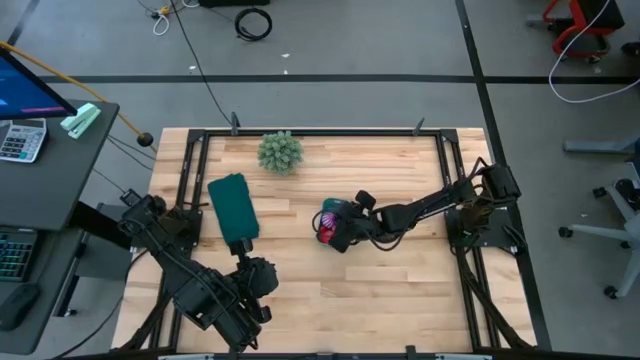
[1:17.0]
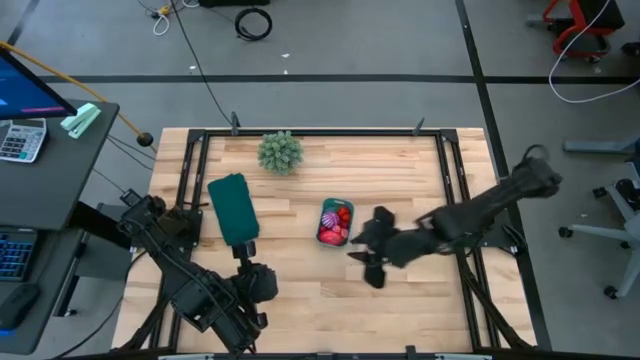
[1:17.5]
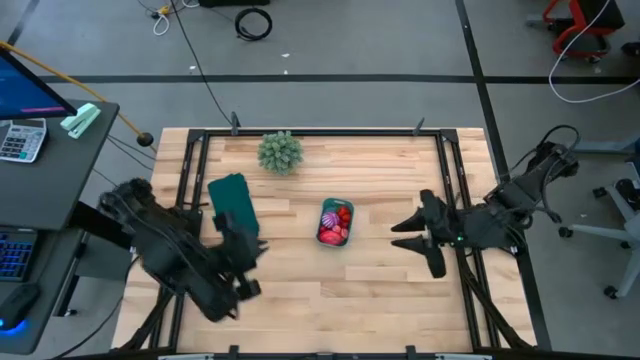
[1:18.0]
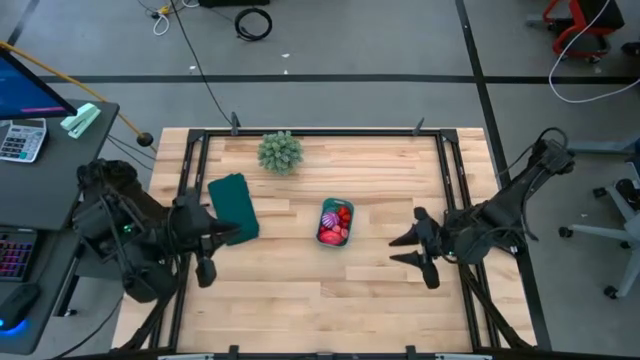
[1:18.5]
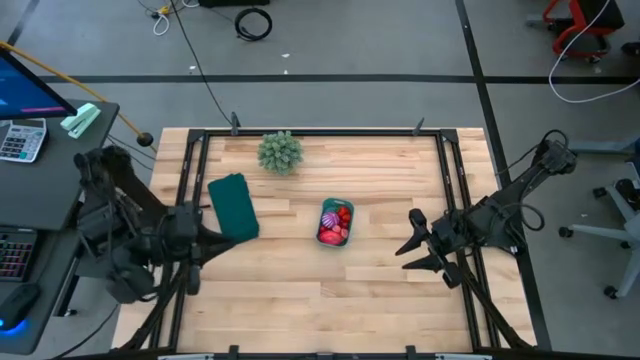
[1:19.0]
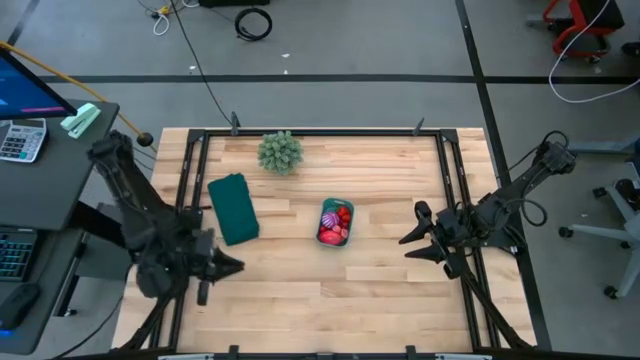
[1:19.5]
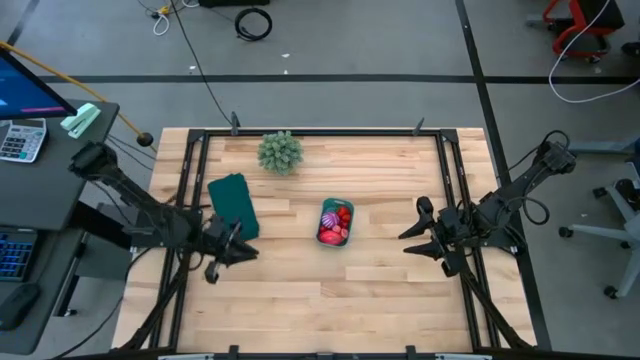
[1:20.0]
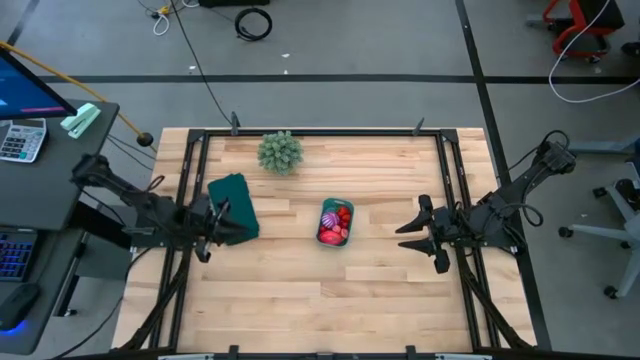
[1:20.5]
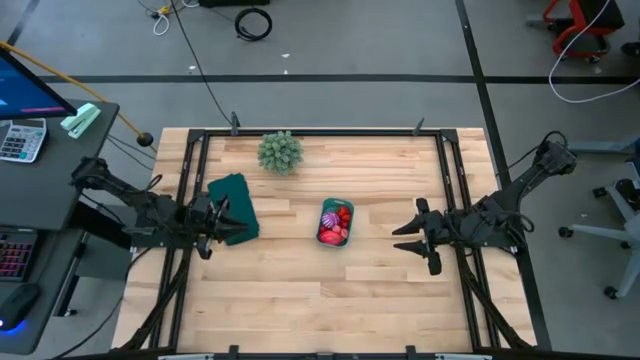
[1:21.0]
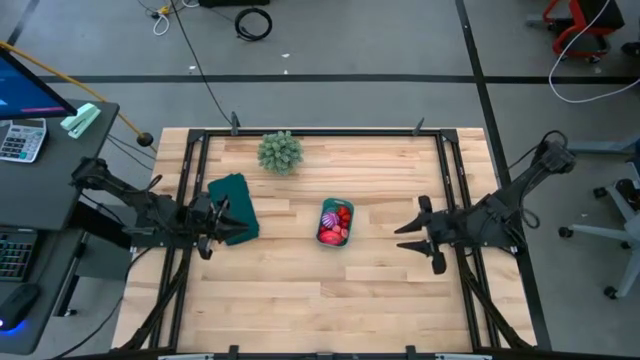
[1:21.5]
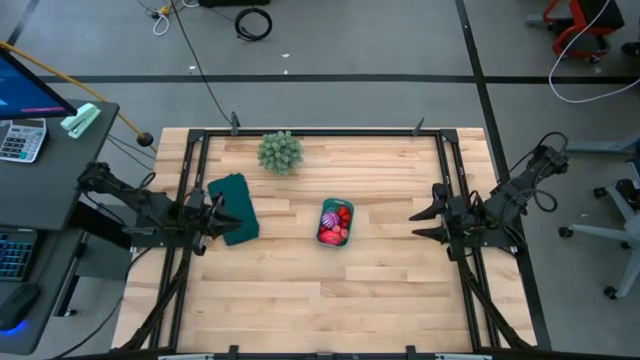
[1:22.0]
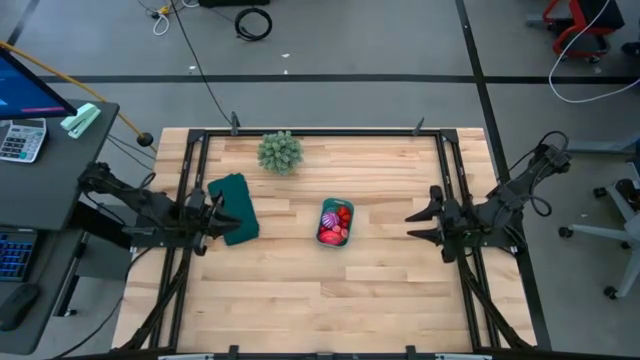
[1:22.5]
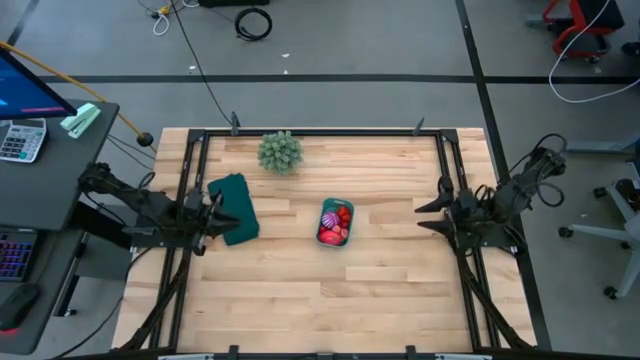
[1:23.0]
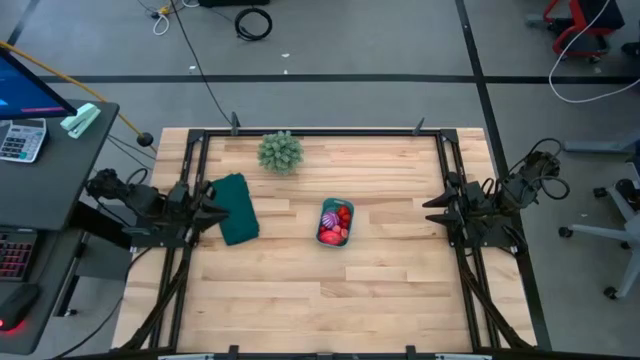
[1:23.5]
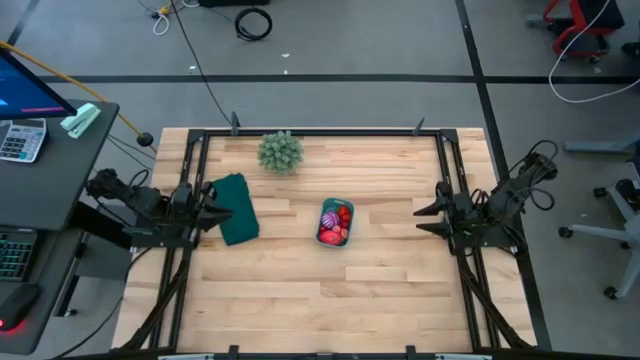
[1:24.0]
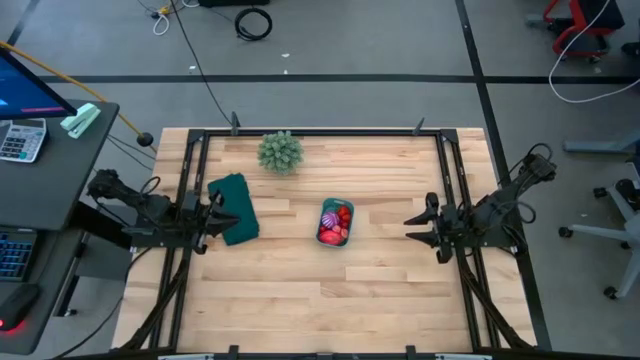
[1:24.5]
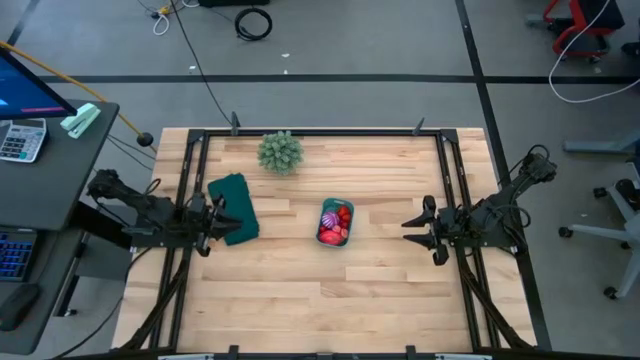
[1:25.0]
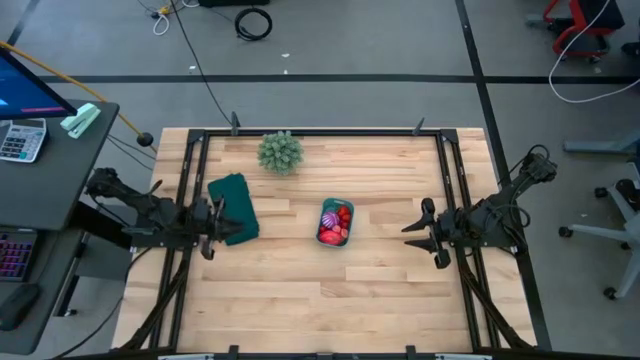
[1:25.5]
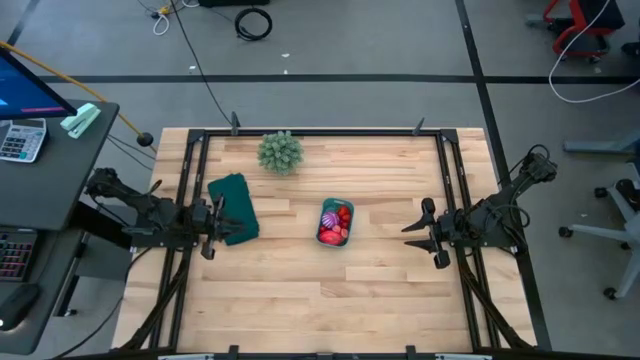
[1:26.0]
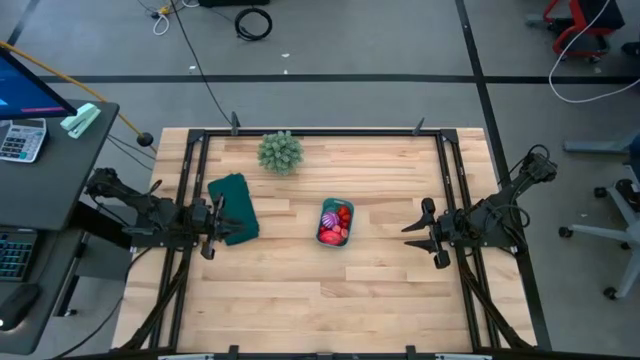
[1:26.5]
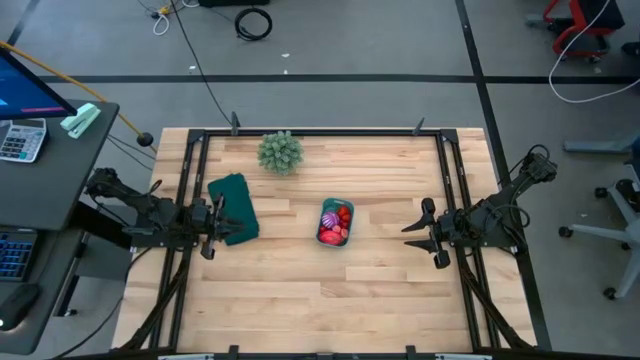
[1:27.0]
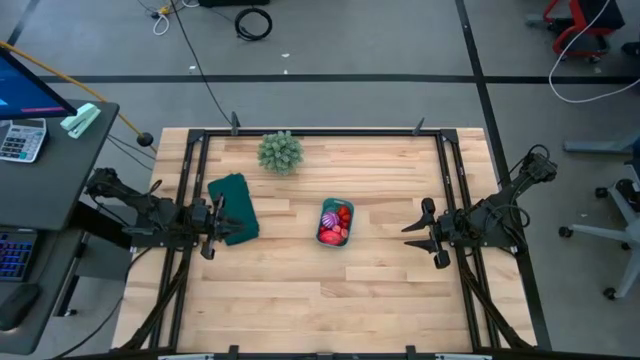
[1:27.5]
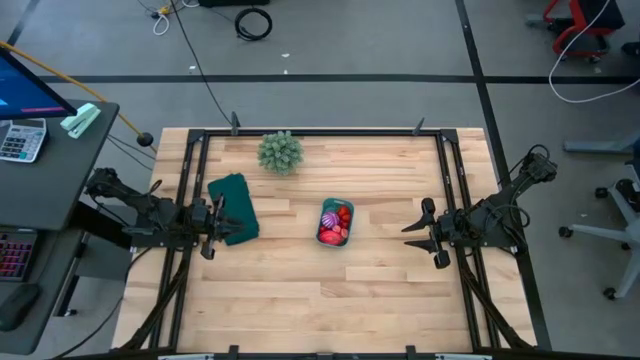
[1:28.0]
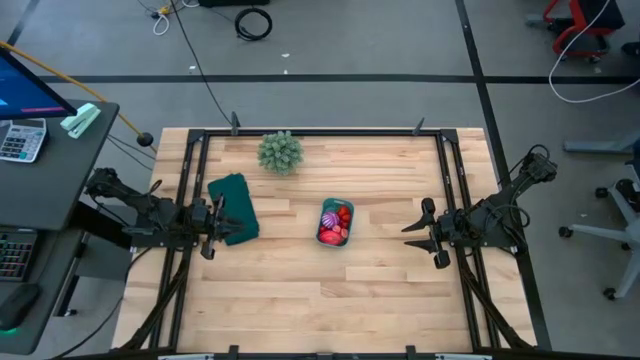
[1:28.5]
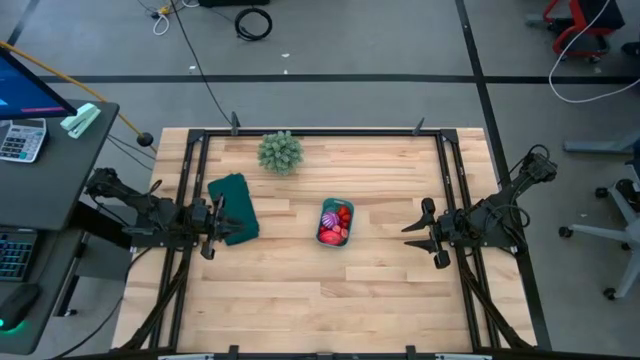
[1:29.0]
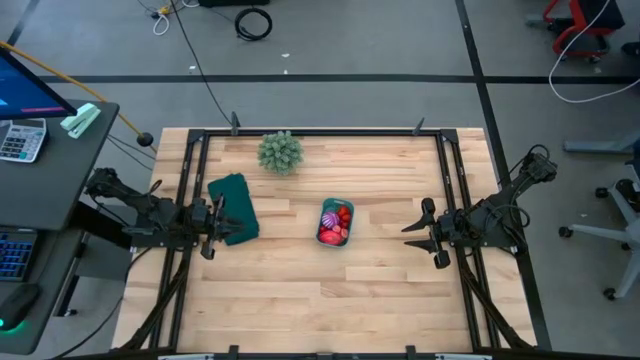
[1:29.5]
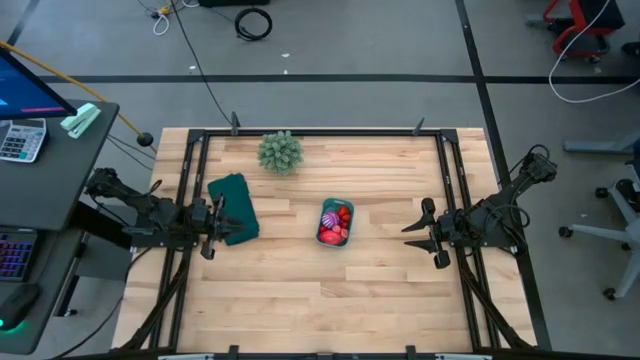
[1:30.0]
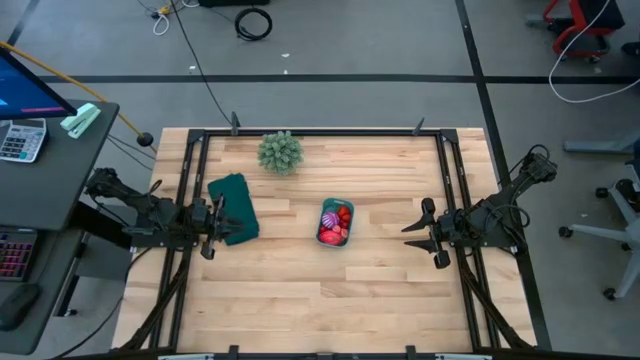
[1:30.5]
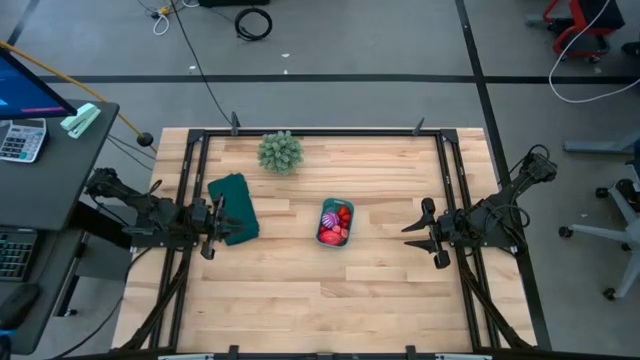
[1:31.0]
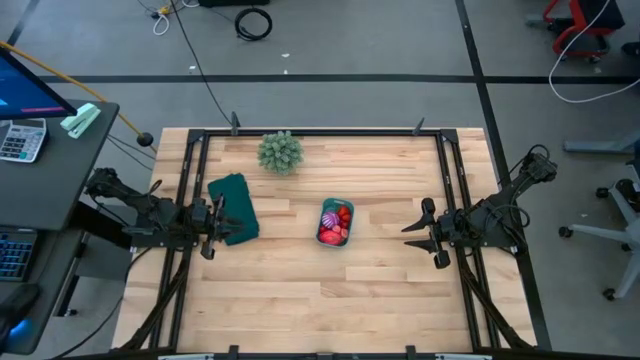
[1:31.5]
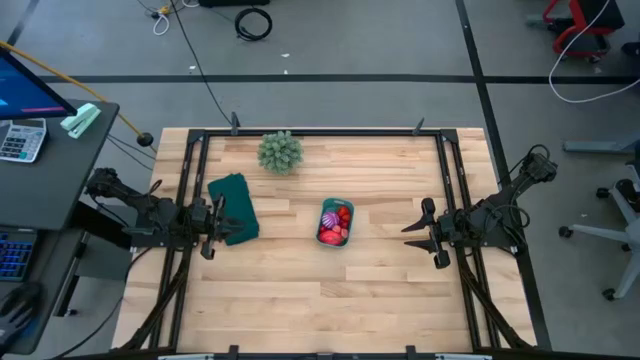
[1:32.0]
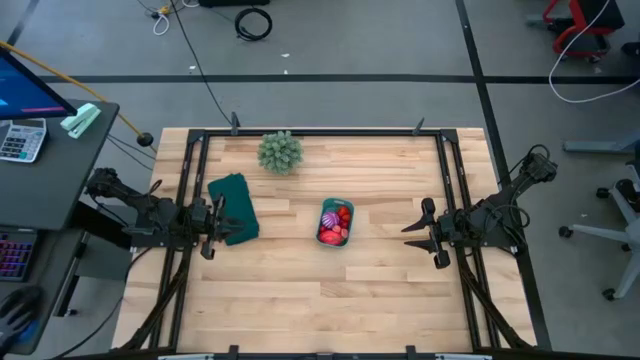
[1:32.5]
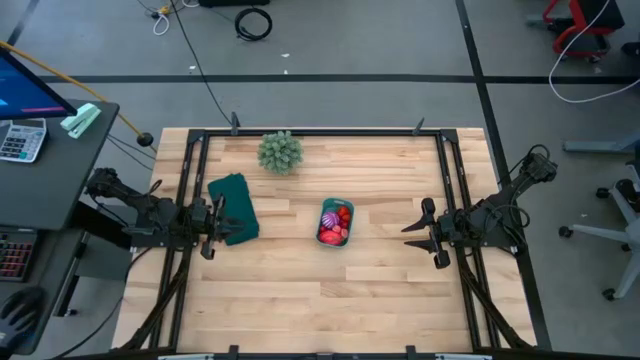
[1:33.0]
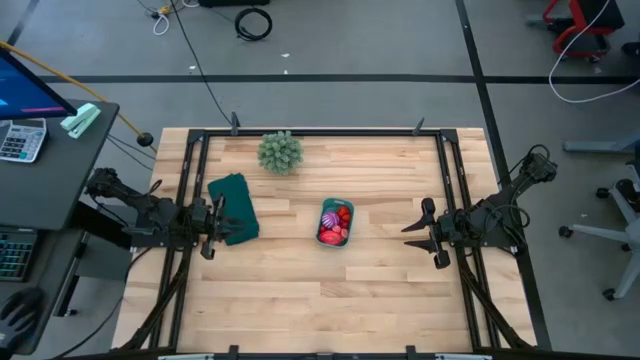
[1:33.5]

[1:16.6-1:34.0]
Task: Pick and placing Produce into tupperware
Return to Home Position

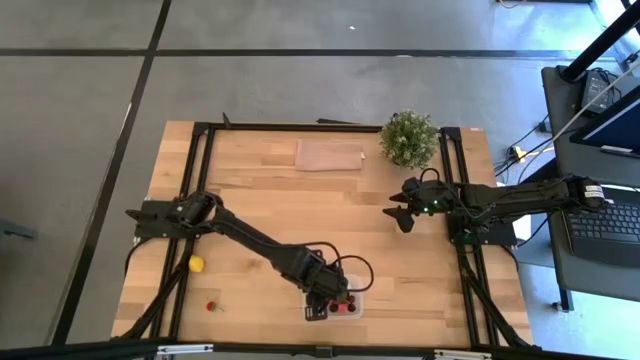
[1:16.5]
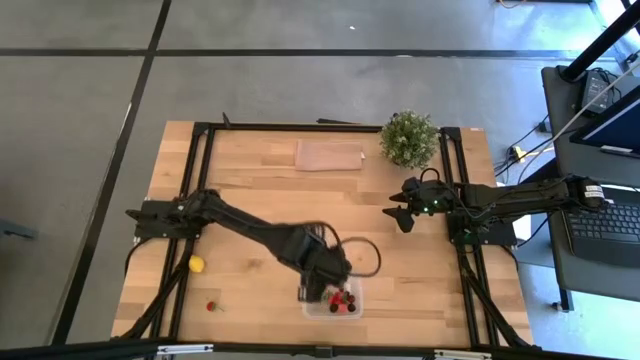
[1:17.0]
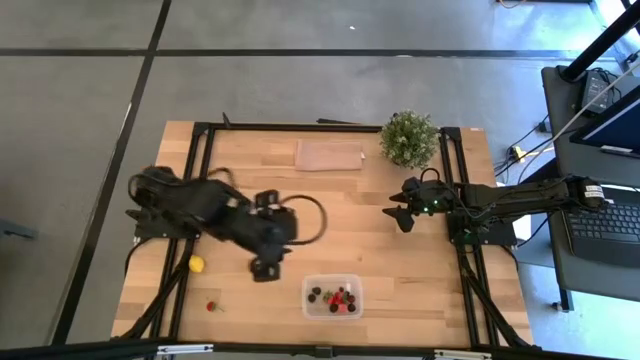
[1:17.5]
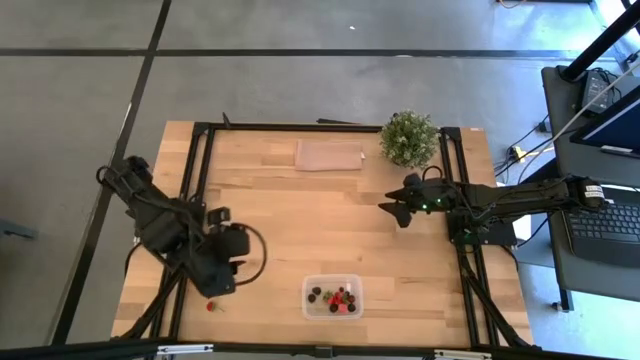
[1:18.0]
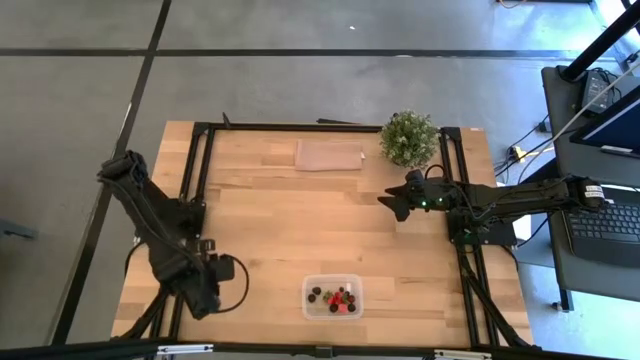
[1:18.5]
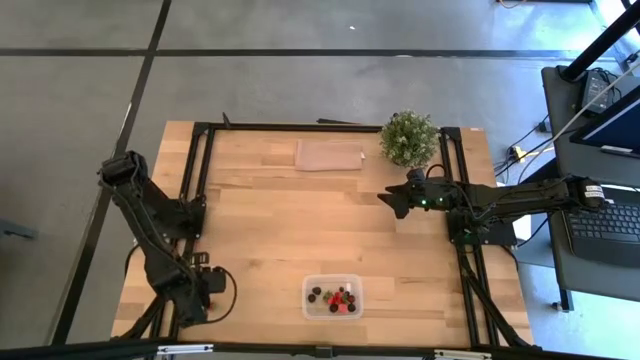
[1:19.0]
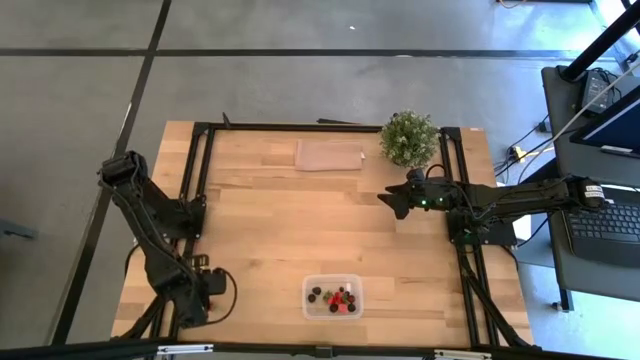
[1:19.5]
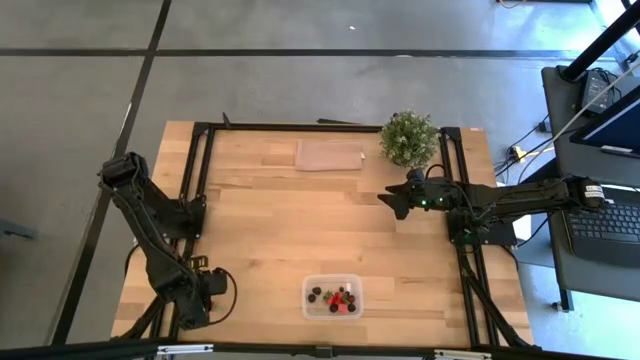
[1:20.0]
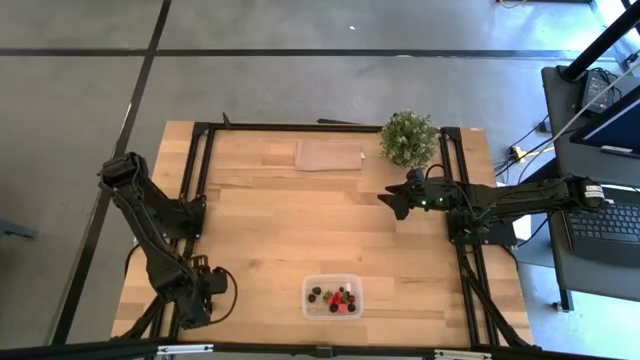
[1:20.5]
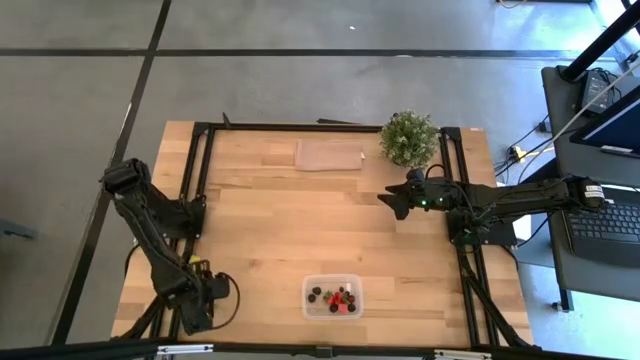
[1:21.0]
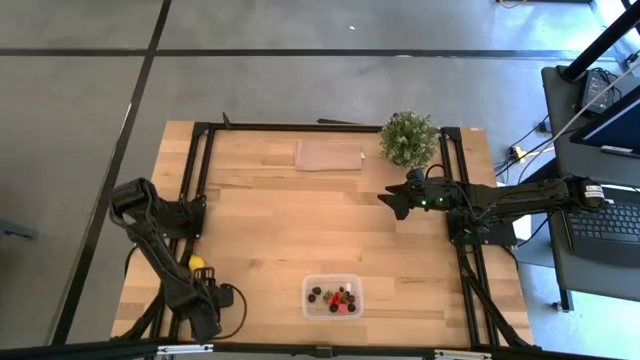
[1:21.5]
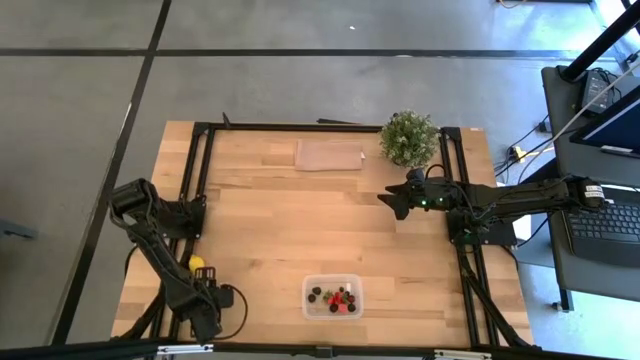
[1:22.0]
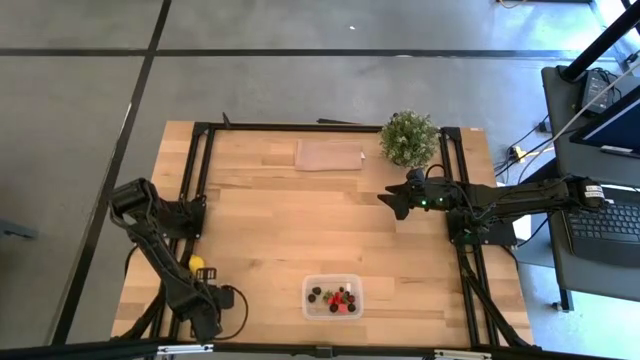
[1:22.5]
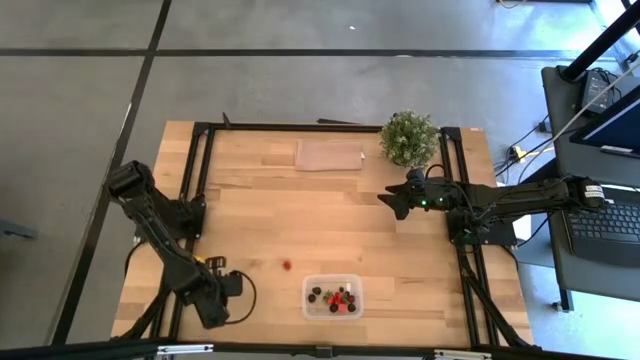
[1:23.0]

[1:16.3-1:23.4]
Task: Pick and placing Produce into tupperware
Put the strawberry into the transparent container
